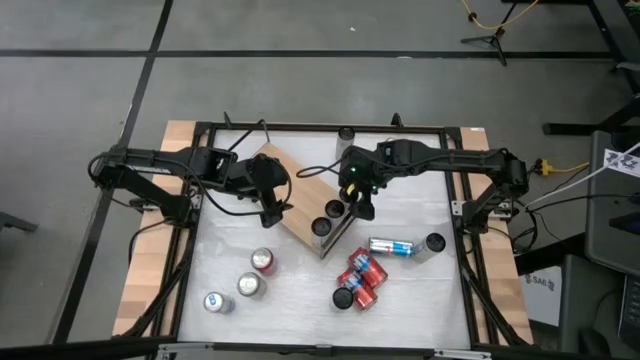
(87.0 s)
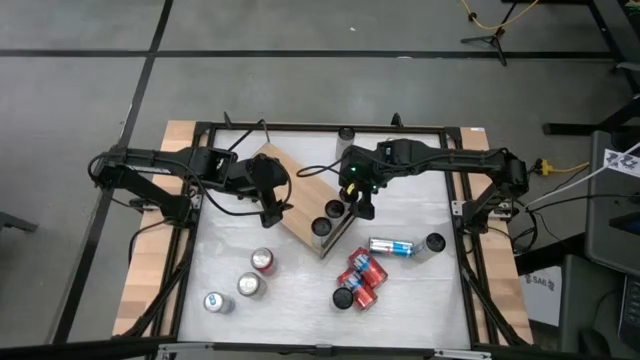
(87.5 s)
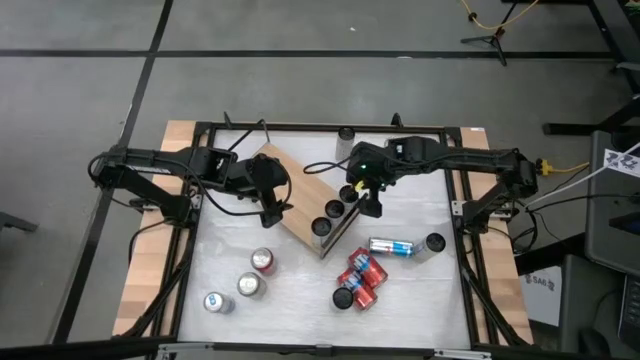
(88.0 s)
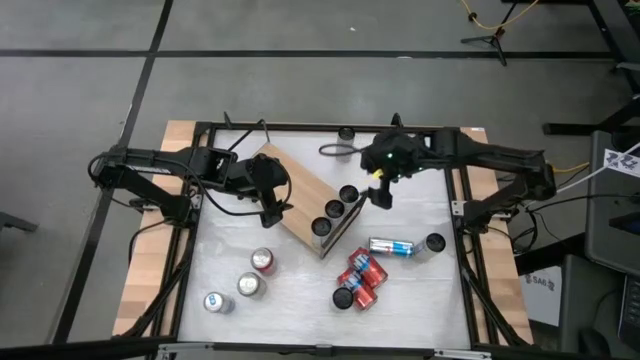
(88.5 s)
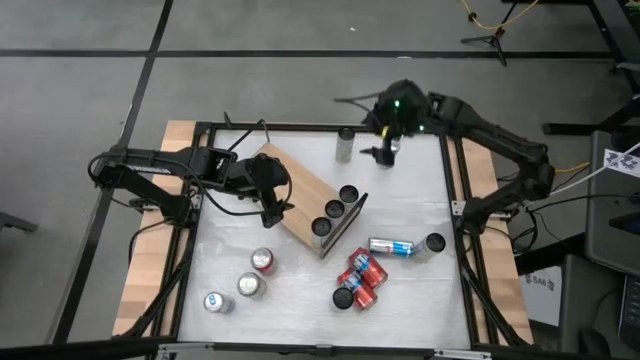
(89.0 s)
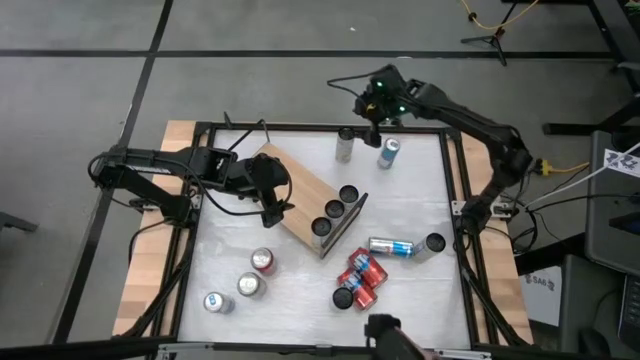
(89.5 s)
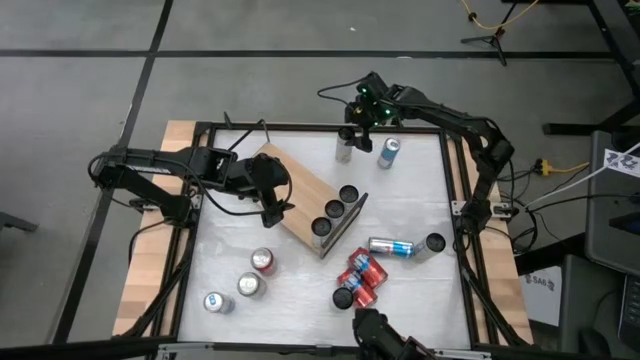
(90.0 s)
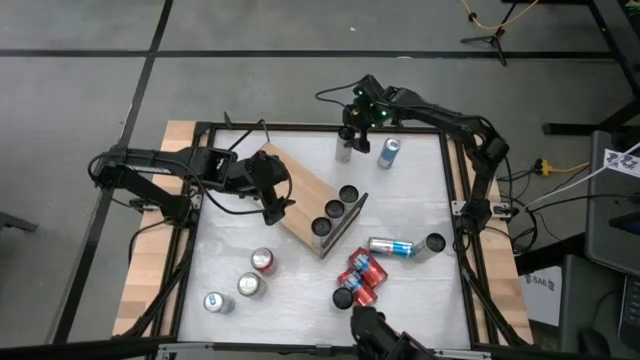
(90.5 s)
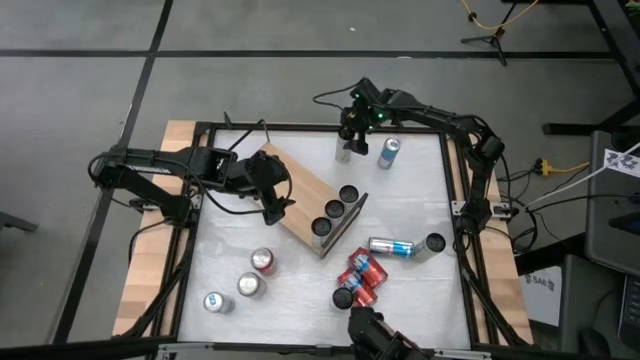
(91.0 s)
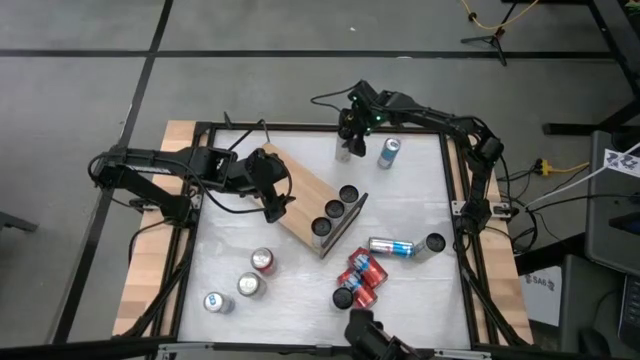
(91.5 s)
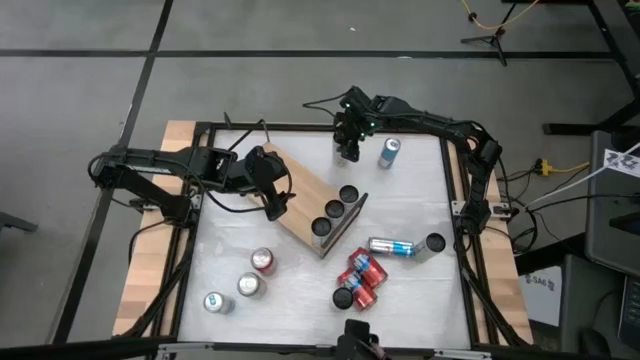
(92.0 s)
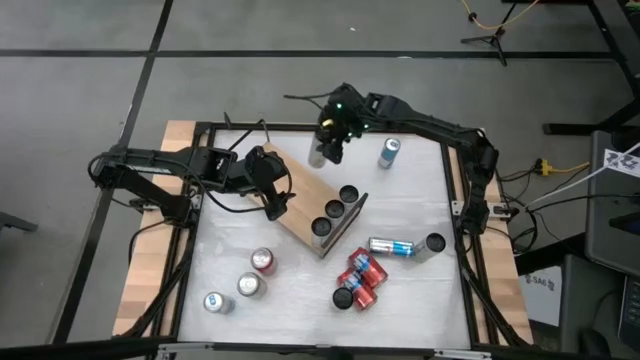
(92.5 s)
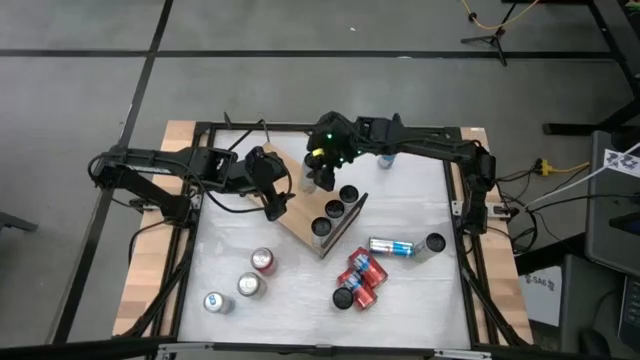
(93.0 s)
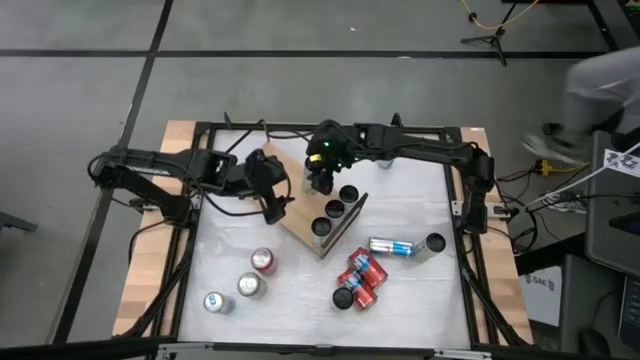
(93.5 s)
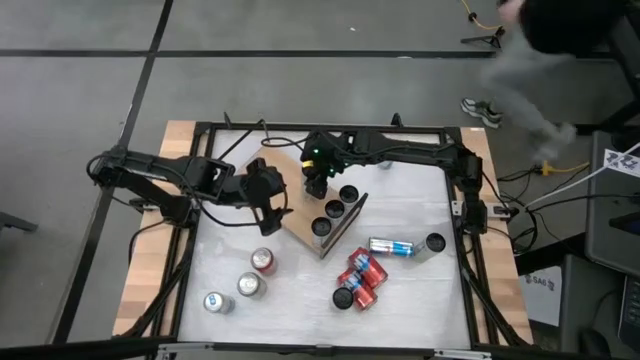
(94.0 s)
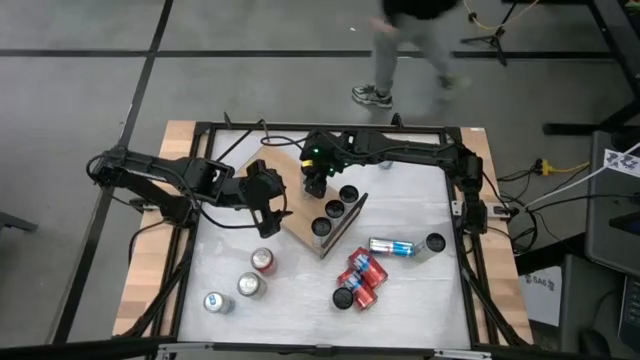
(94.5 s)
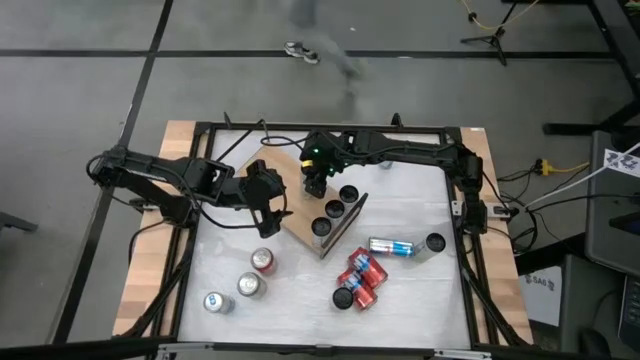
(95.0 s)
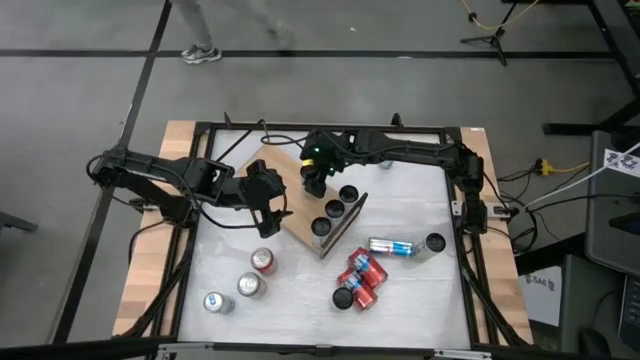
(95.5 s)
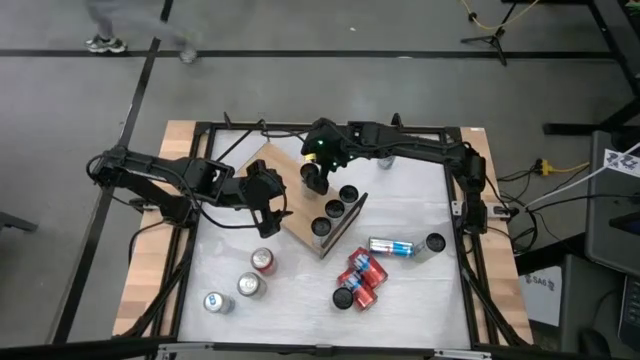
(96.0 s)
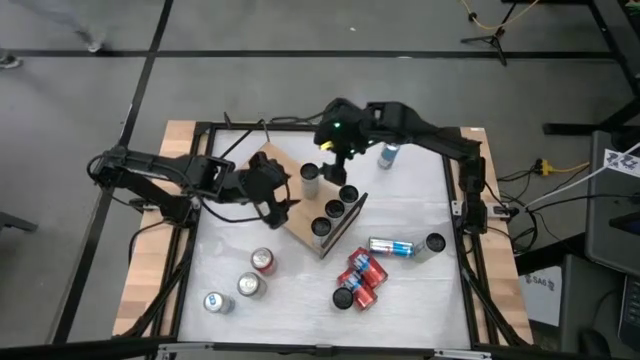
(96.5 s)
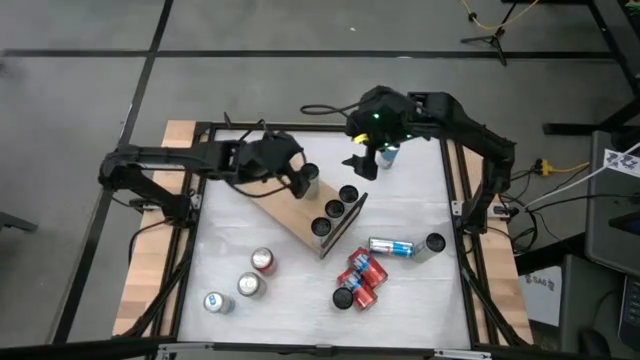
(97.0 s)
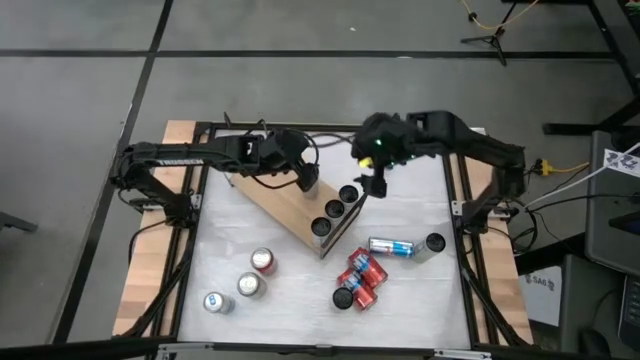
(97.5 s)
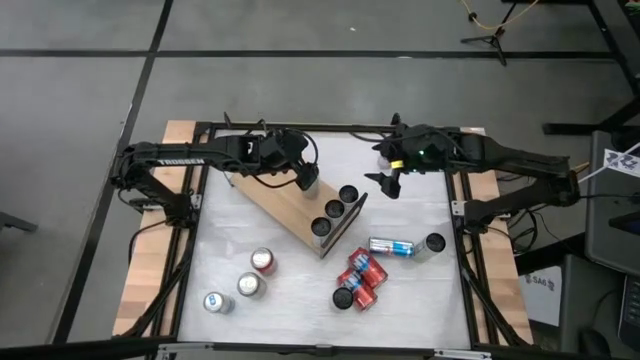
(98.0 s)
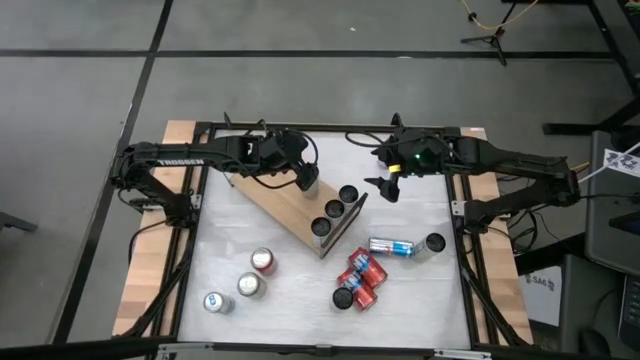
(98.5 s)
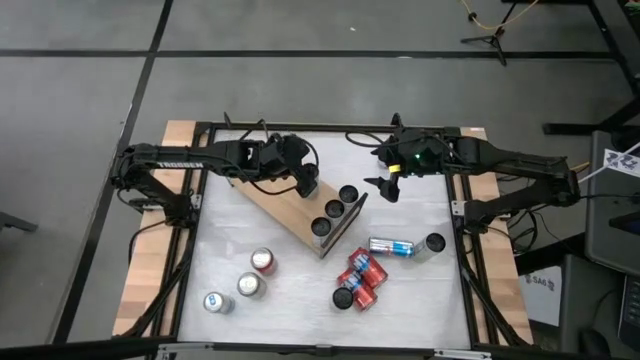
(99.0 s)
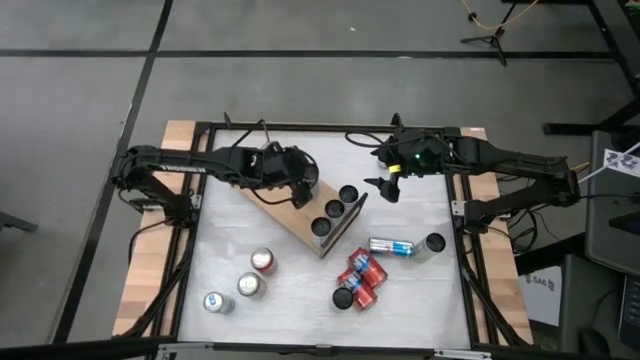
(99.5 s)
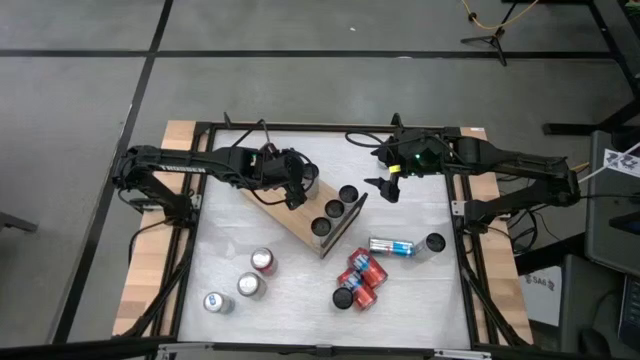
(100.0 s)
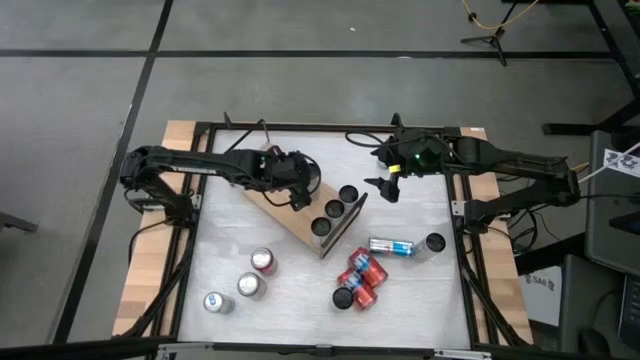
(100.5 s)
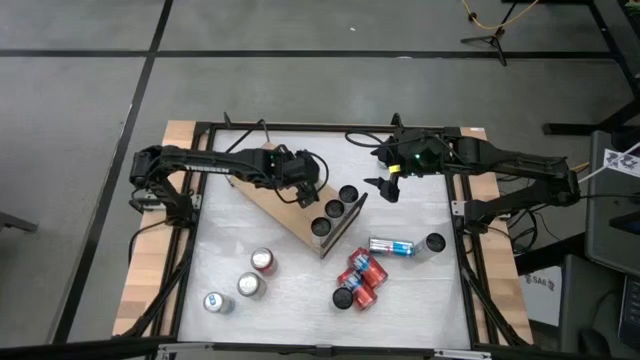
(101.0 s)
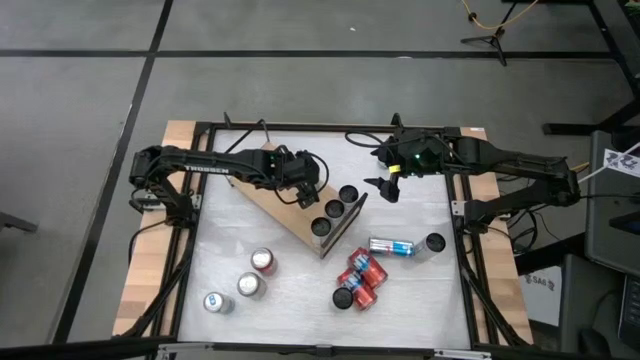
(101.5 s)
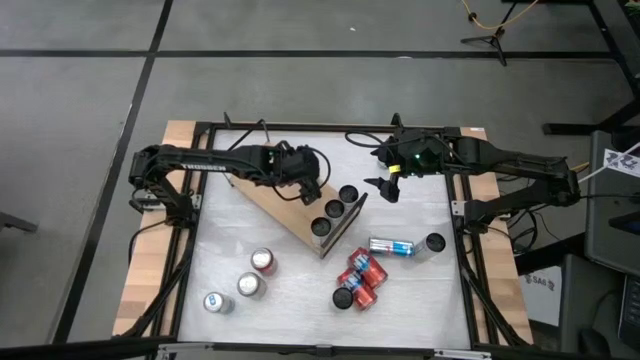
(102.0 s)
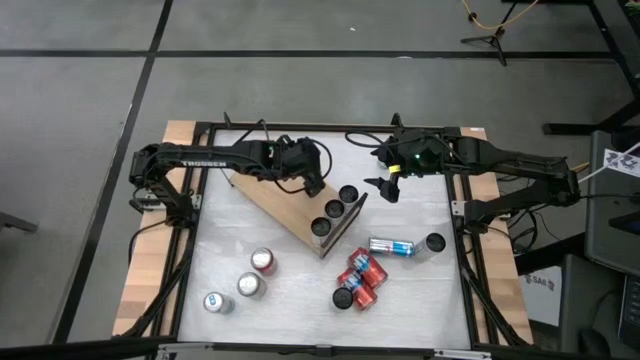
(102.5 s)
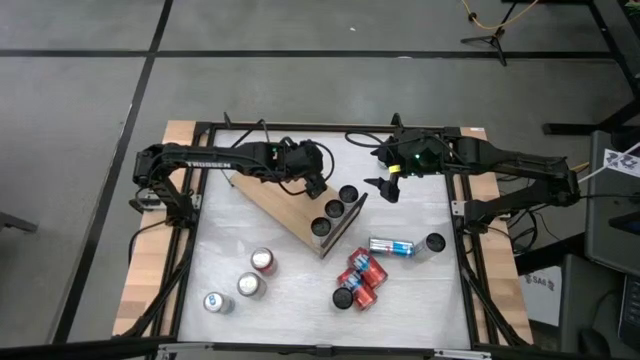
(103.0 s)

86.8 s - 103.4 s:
Task: Place canned beverage on shelf
Put the top left white-yellow soda can on the shelf
